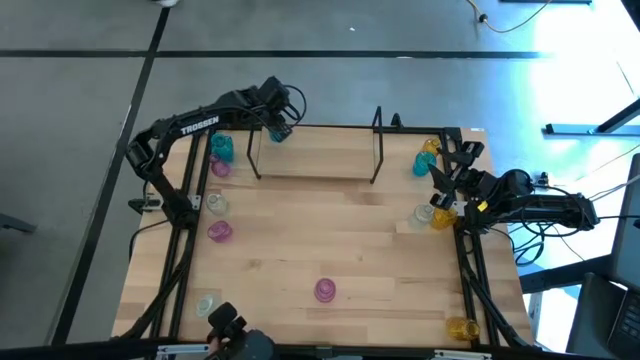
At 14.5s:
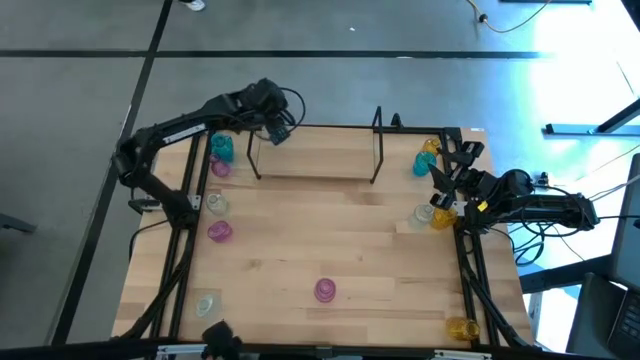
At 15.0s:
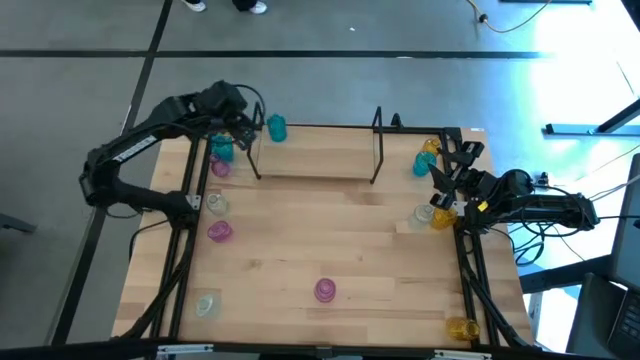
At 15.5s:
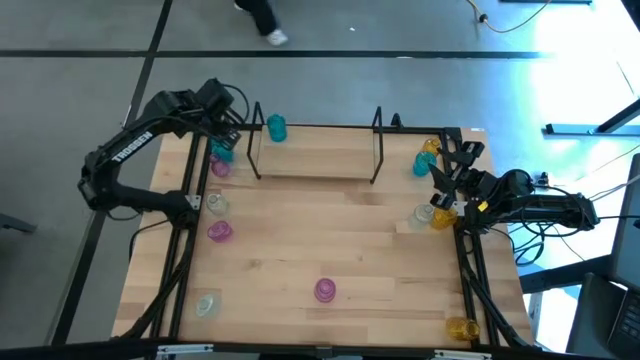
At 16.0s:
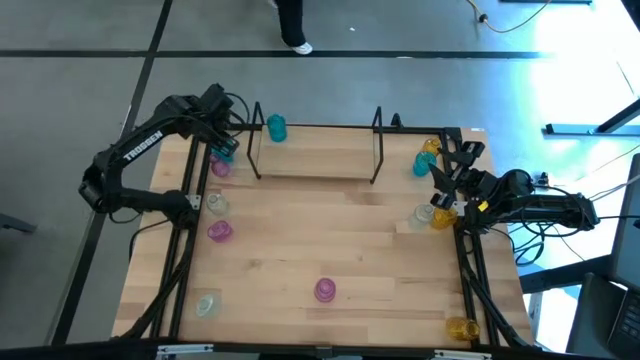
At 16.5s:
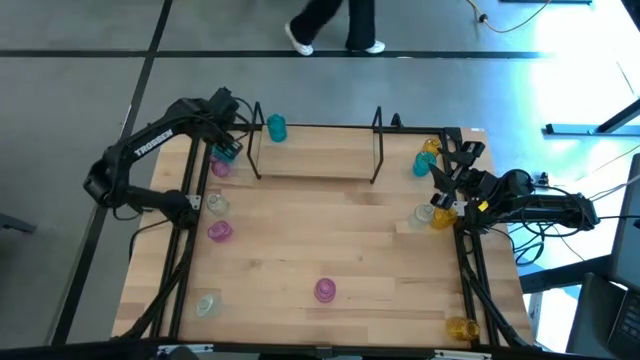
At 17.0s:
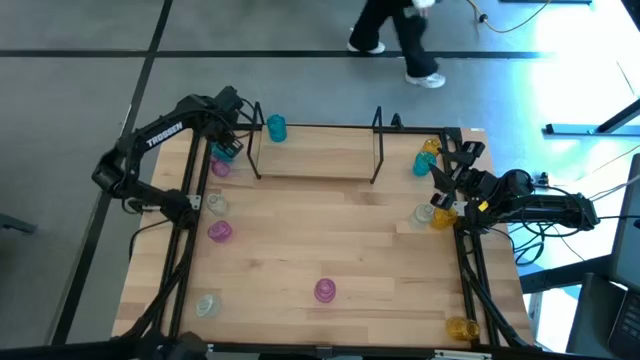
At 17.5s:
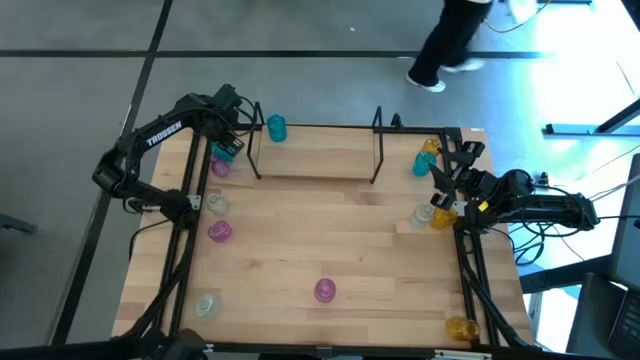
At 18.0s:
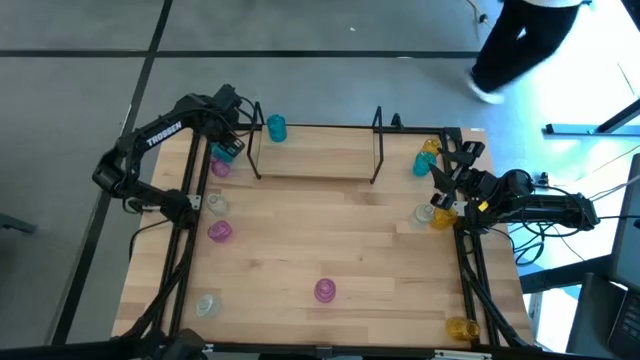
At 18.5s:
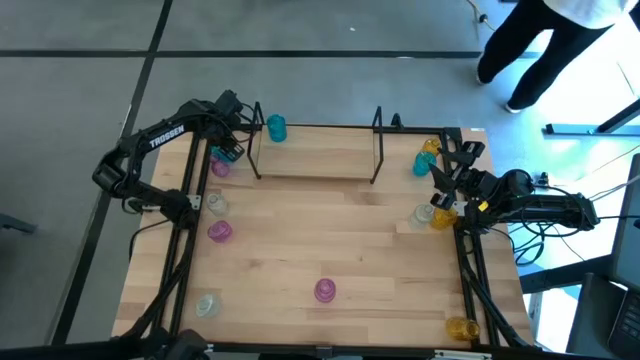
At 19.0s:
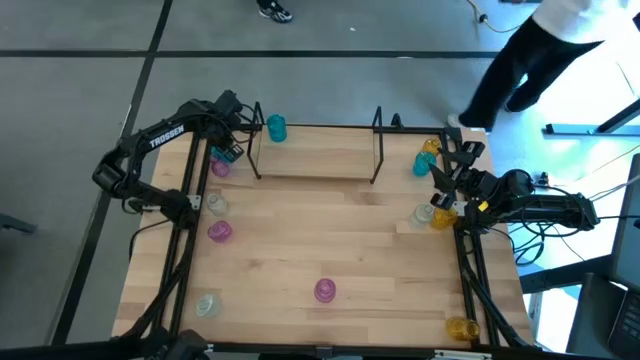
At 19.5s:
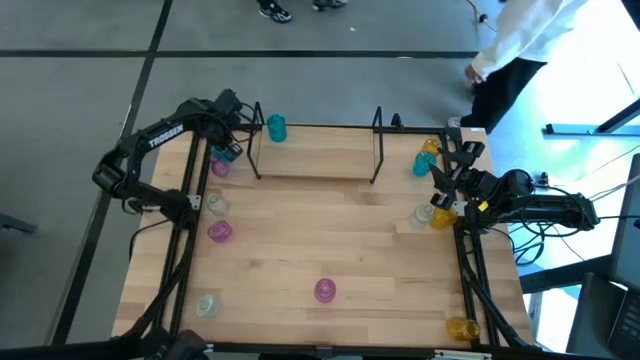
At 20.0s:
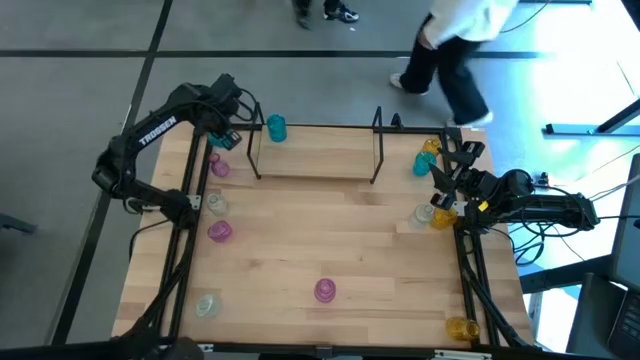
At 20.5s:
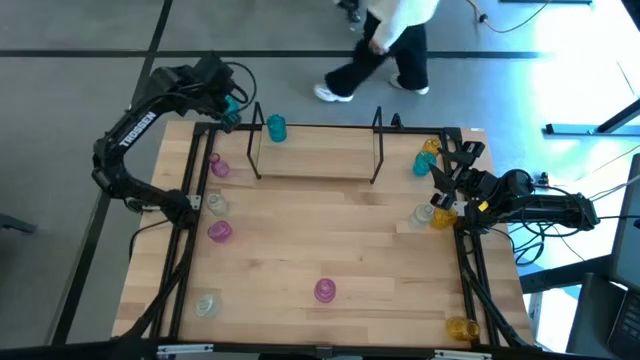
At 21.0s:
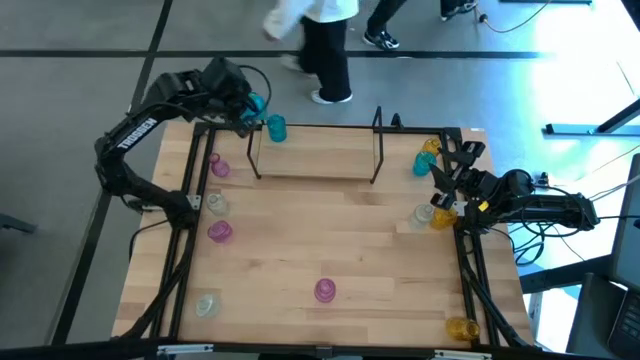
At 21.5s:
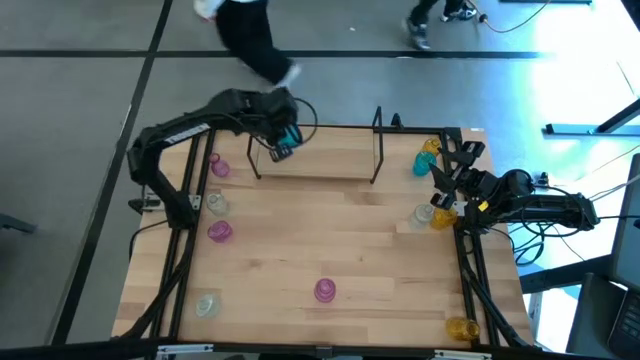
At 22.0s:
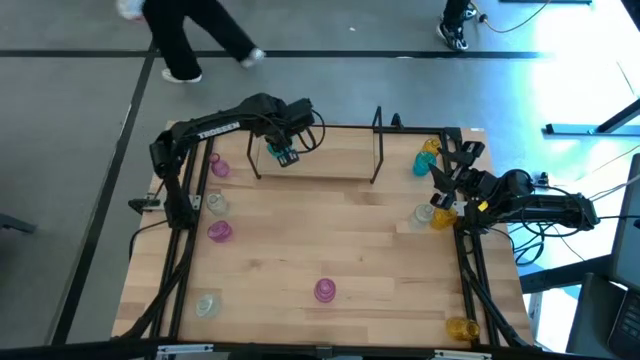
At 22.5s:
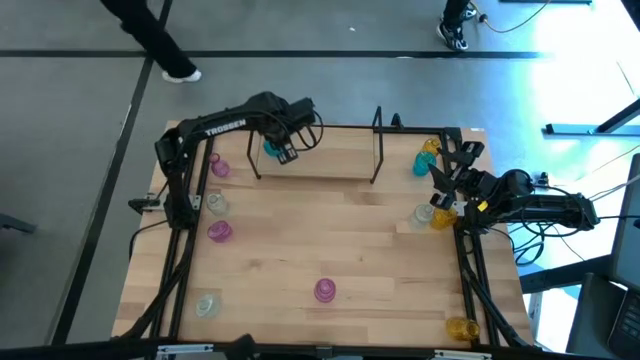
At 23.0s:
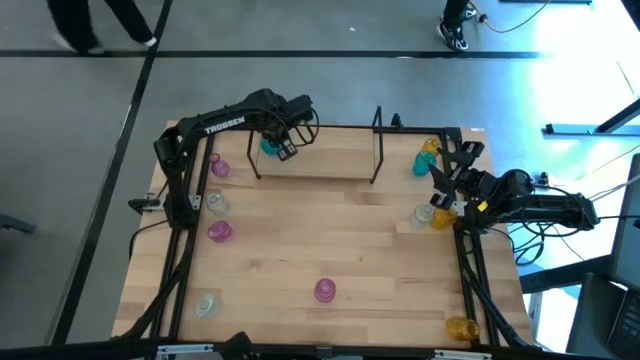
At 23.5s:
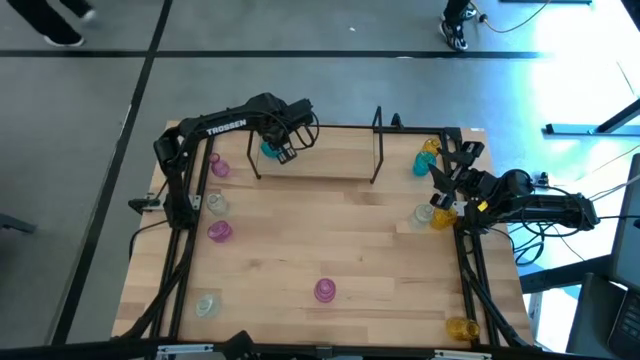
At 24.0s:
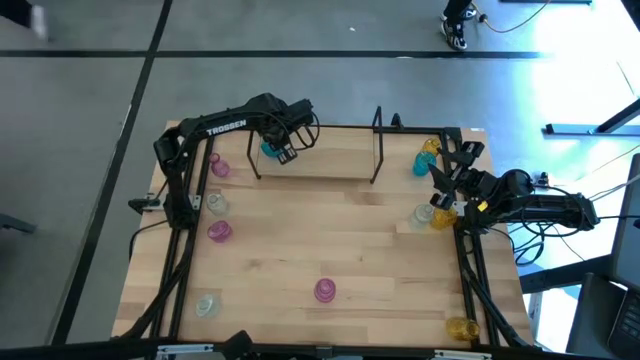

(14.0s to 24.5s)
Task: sort vases onto shelf
Put the left blue vase on the shelf aligned with the other blue vase

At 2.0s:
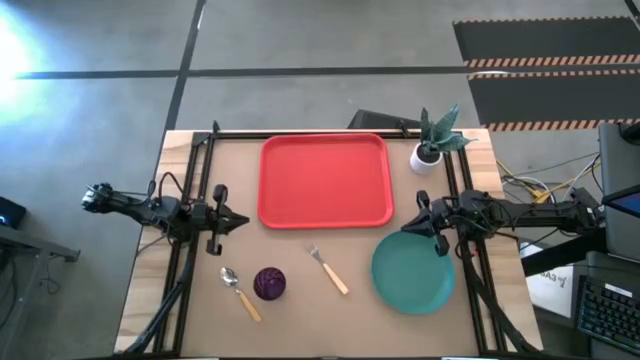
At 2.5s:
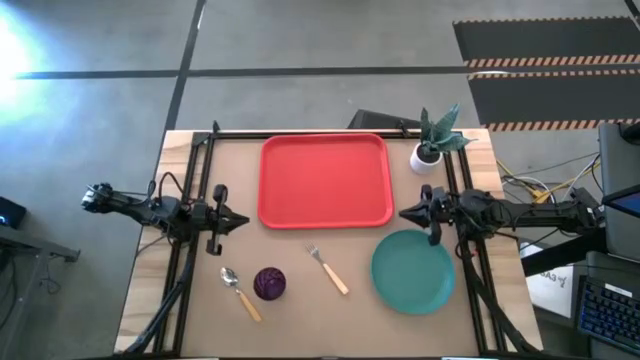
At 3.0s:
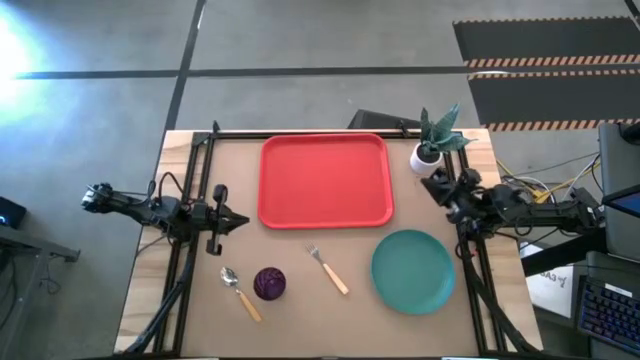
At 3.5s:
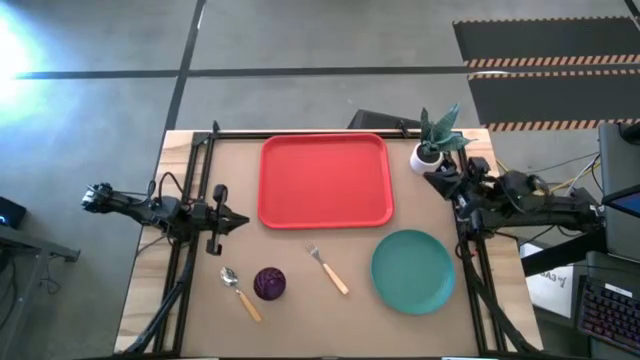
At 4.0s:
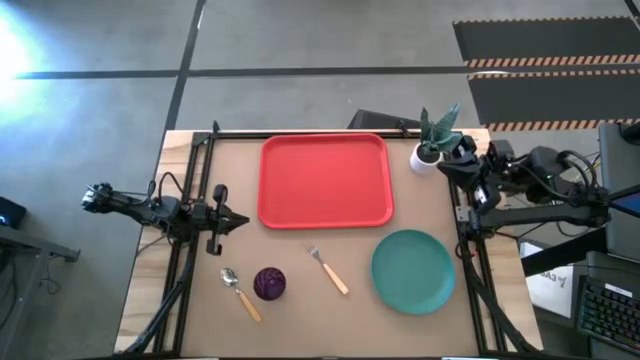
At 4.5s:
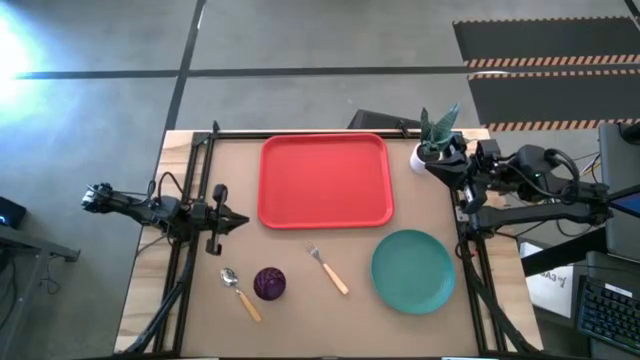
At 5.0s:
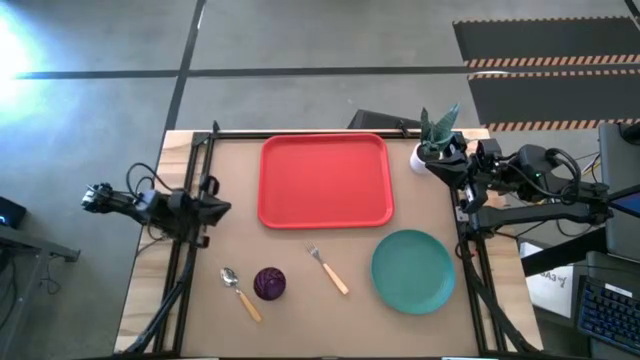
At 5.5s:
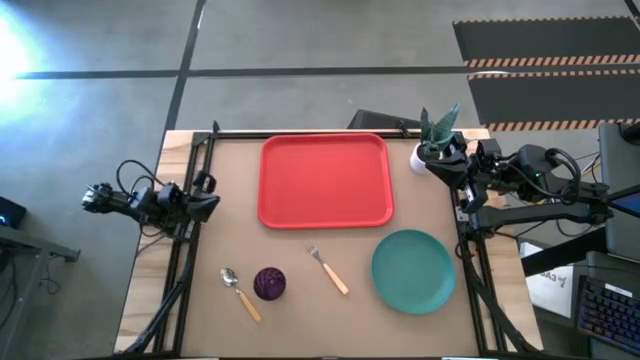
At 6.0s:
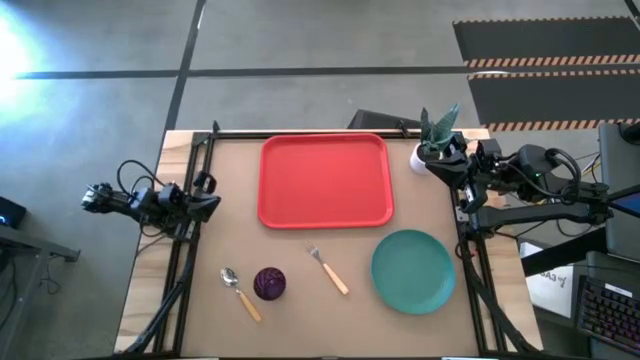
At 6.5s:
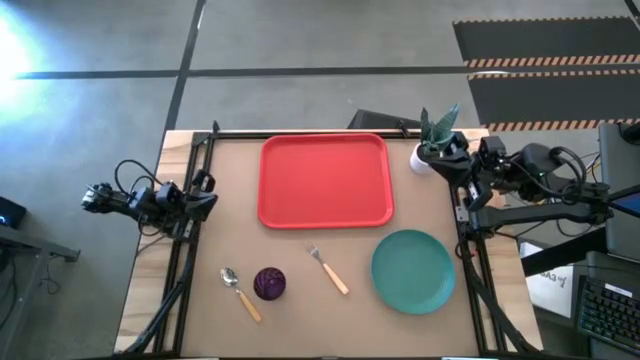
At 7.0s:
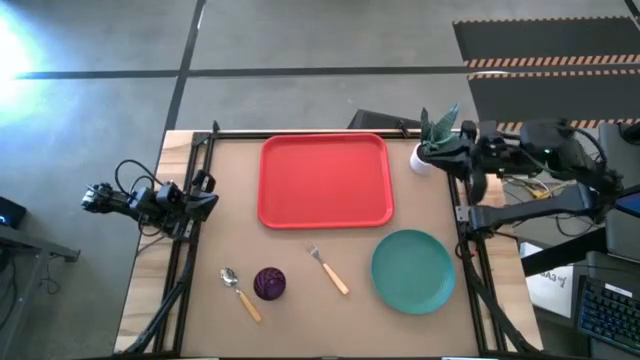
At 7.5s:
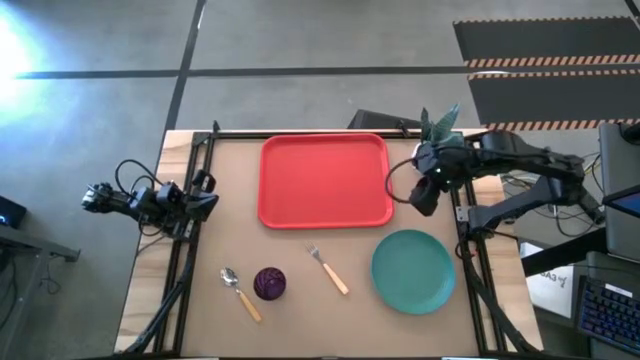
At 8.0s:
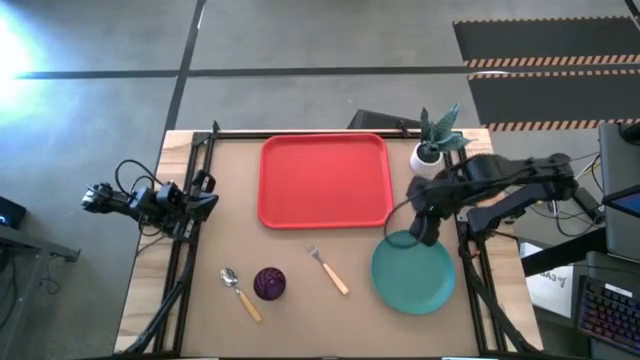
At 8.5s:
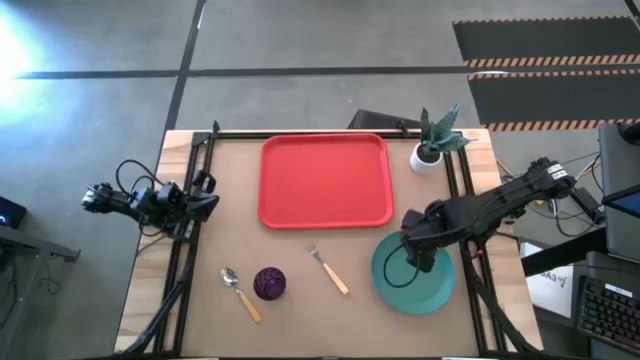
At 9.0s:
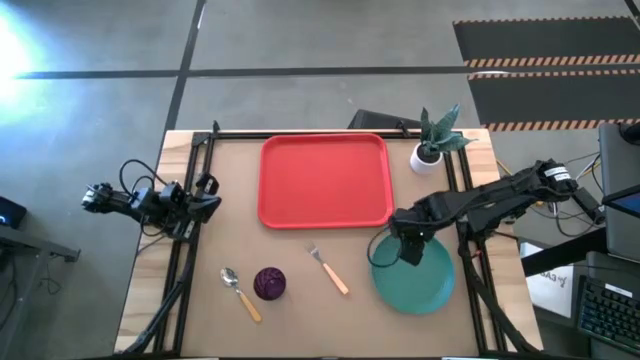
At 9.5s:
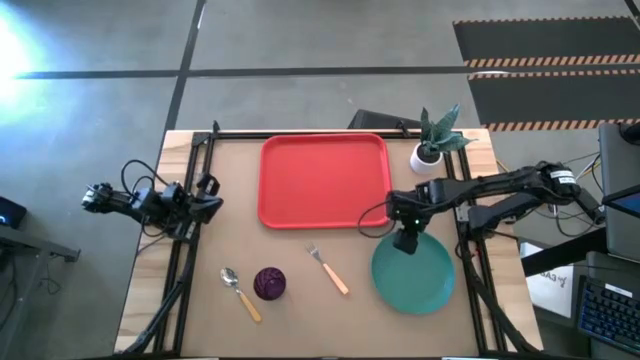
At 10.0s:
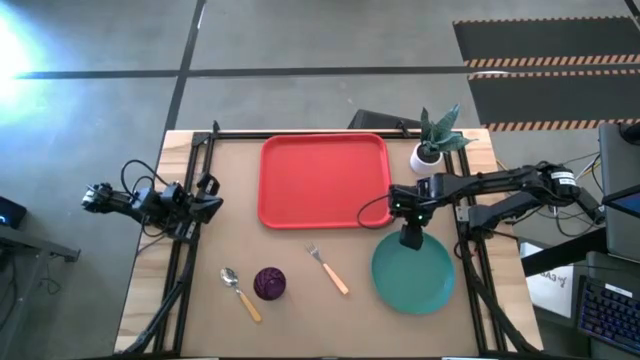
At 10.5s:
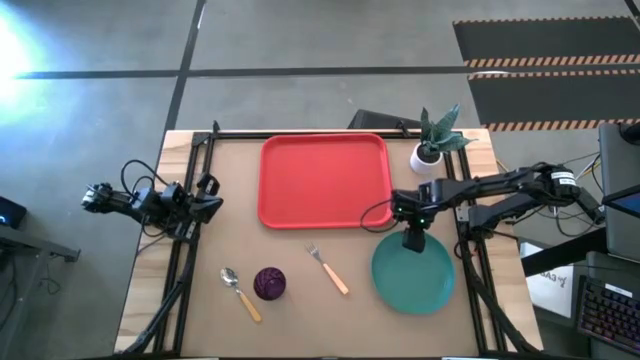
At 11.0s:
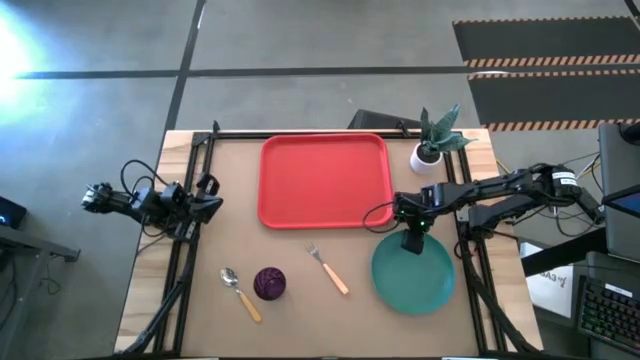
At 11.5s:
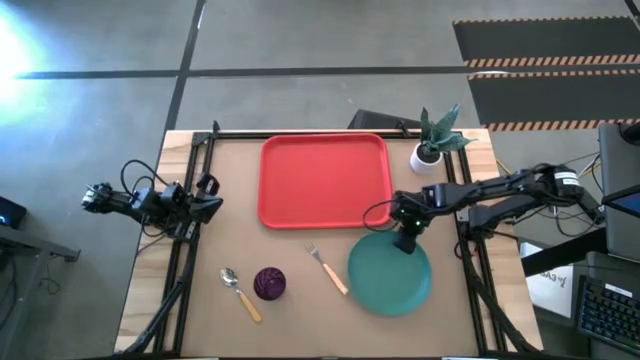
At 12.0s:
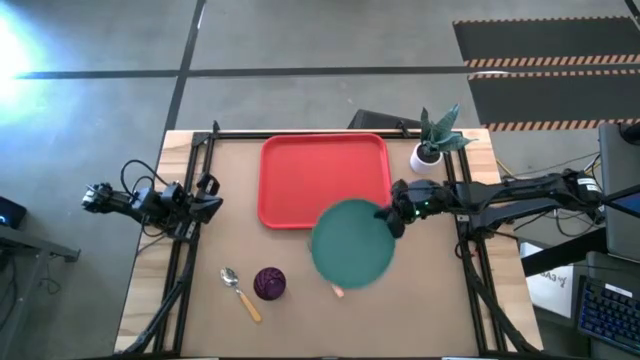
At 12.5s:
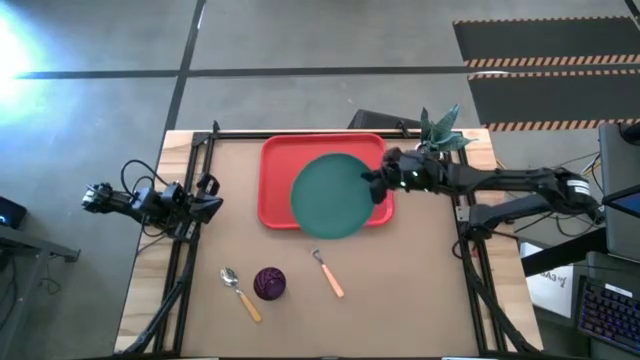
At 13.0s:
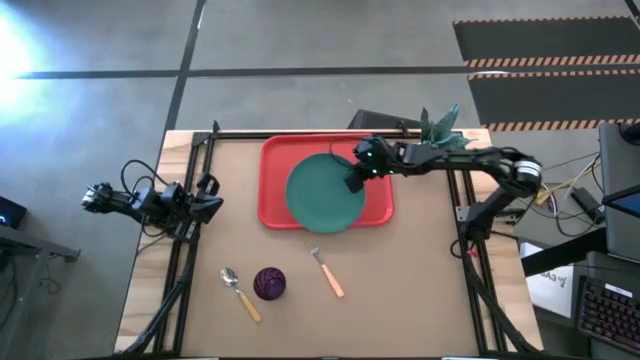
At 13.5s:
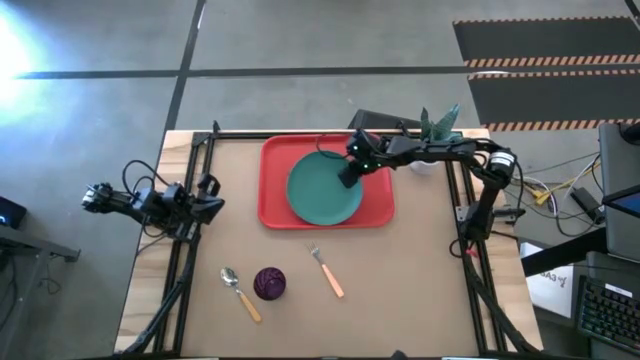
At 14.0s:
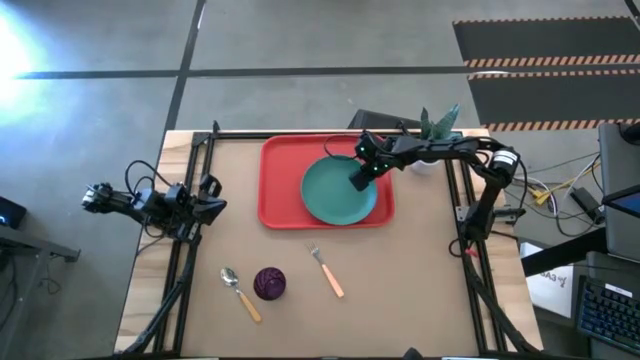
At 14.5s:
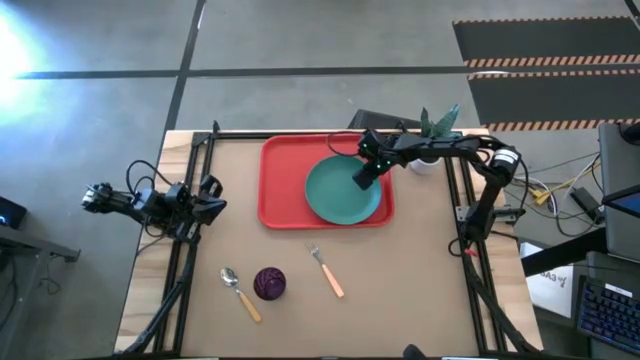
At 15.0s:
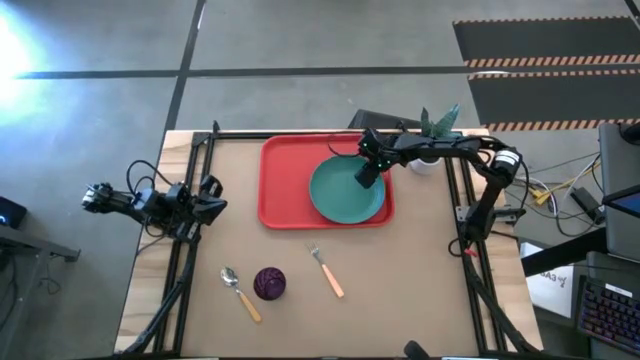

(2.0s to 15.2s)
Task: Pick and place plate/cup/fork/spoon on tray
Put the green plate on the orange tray
